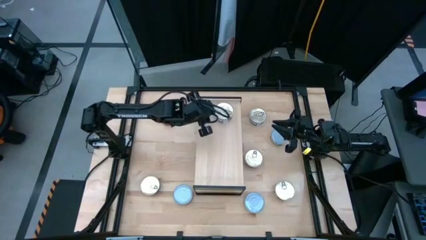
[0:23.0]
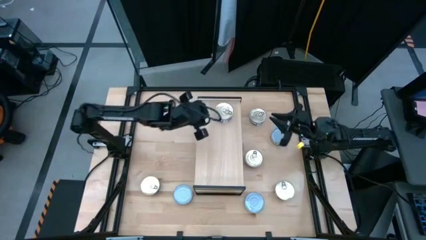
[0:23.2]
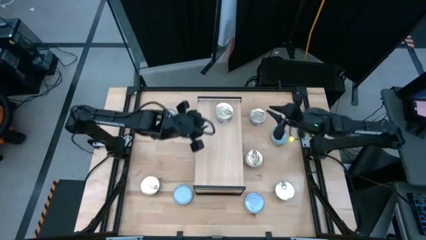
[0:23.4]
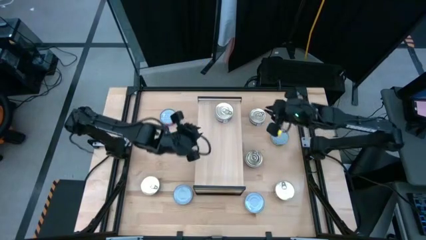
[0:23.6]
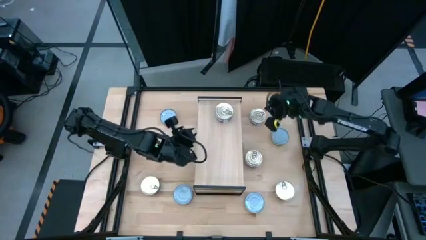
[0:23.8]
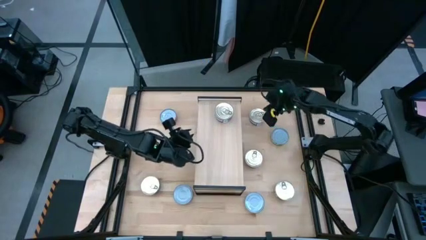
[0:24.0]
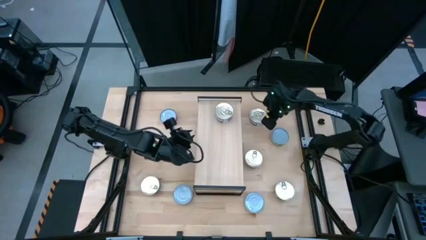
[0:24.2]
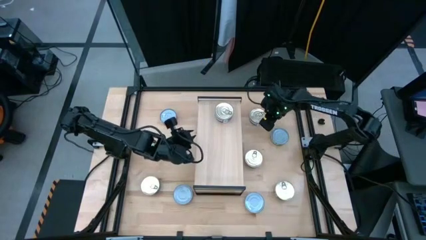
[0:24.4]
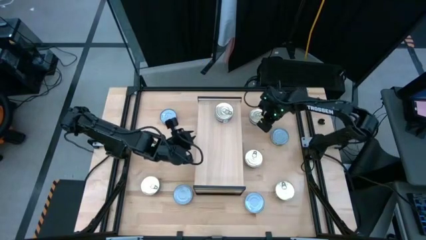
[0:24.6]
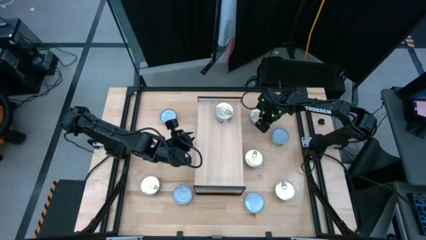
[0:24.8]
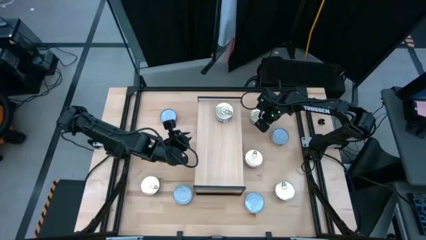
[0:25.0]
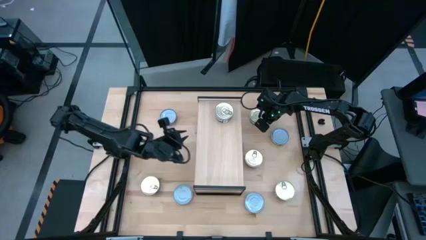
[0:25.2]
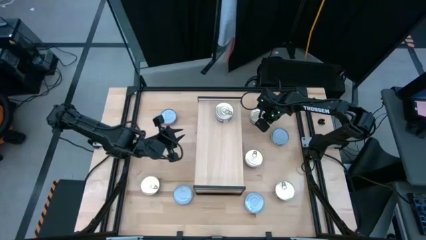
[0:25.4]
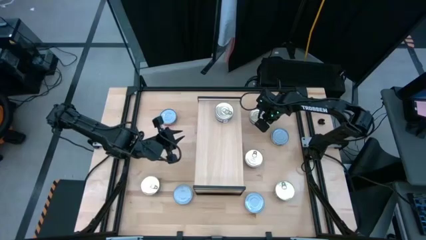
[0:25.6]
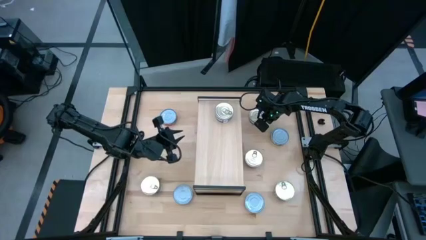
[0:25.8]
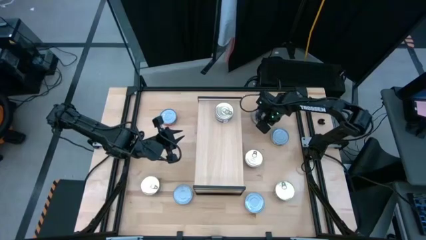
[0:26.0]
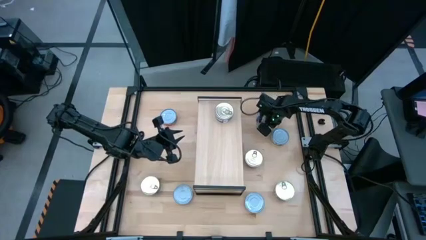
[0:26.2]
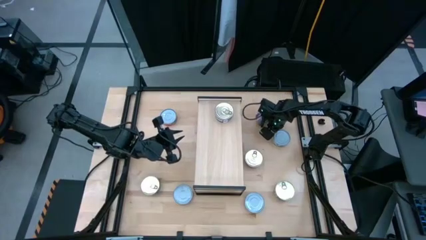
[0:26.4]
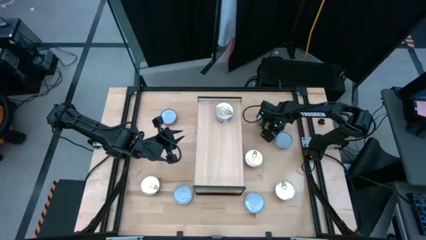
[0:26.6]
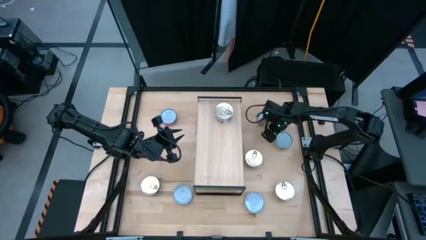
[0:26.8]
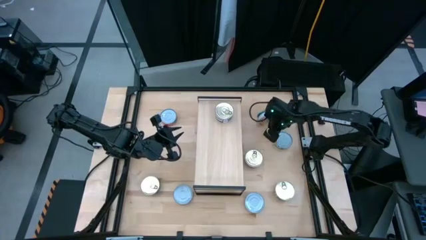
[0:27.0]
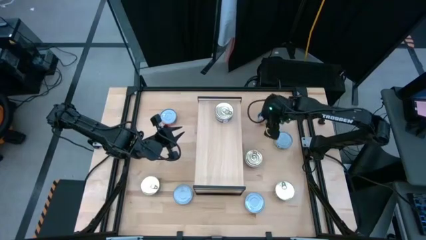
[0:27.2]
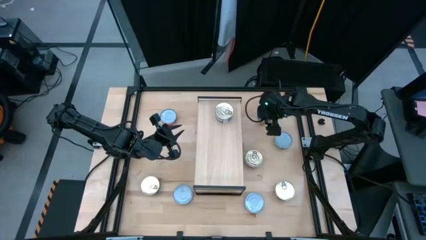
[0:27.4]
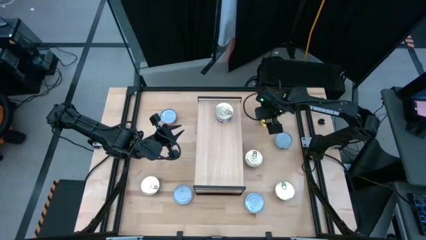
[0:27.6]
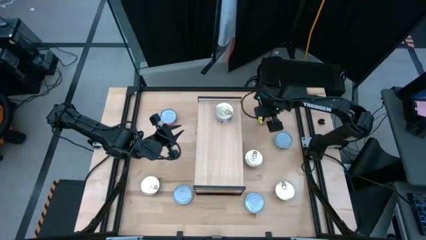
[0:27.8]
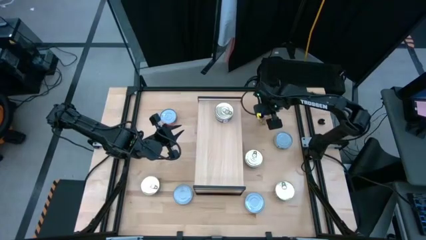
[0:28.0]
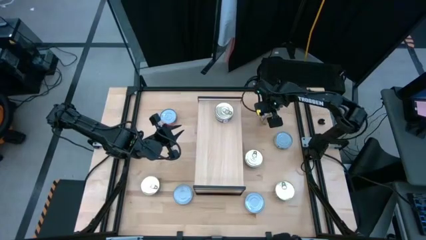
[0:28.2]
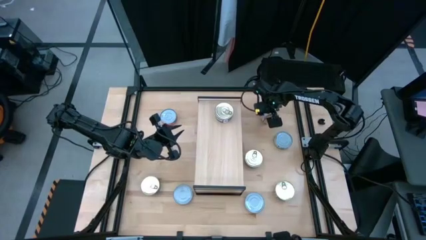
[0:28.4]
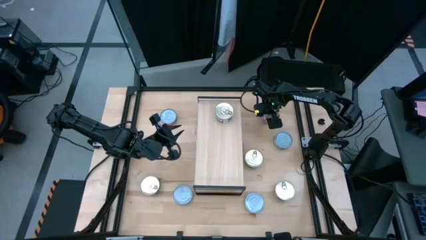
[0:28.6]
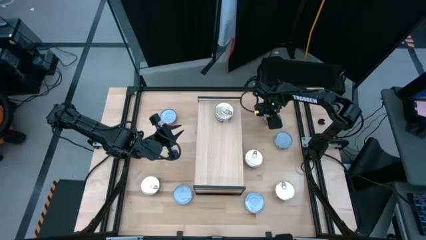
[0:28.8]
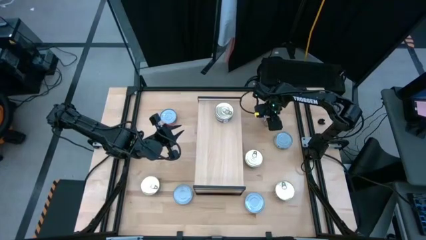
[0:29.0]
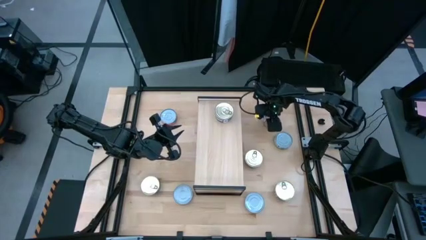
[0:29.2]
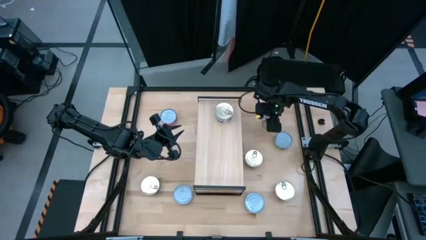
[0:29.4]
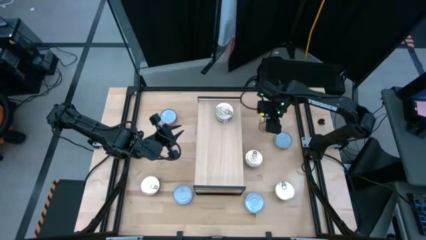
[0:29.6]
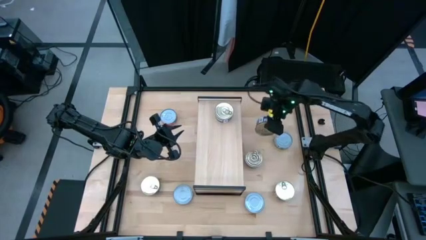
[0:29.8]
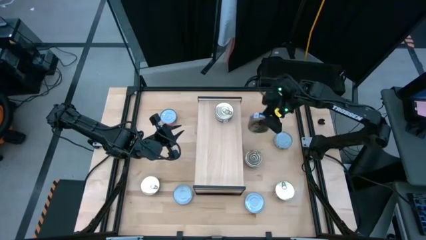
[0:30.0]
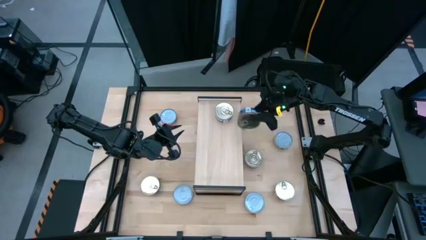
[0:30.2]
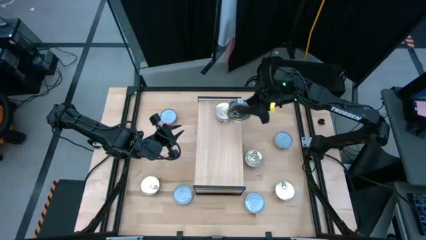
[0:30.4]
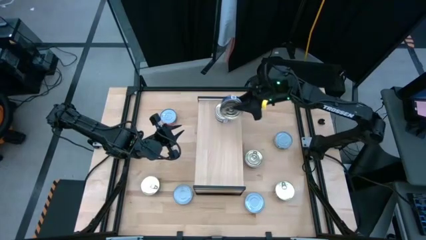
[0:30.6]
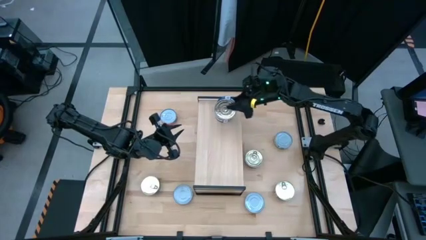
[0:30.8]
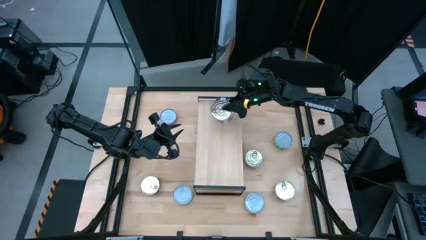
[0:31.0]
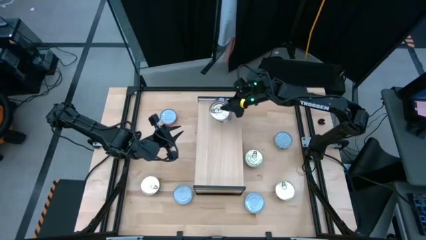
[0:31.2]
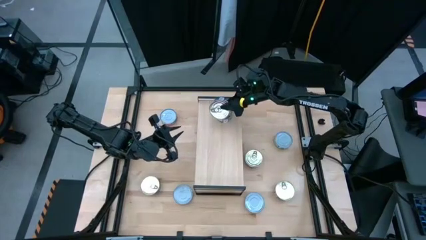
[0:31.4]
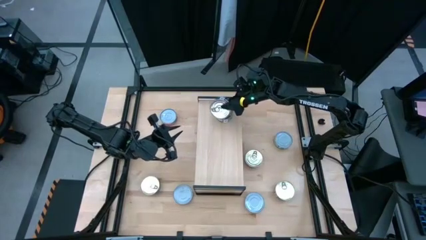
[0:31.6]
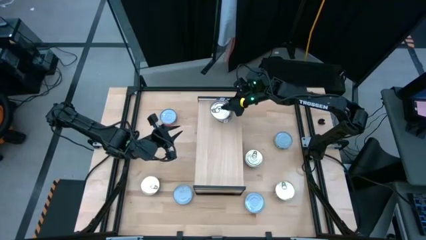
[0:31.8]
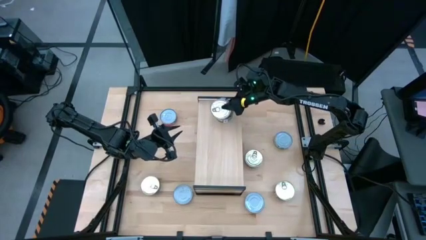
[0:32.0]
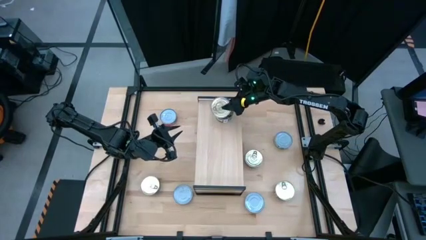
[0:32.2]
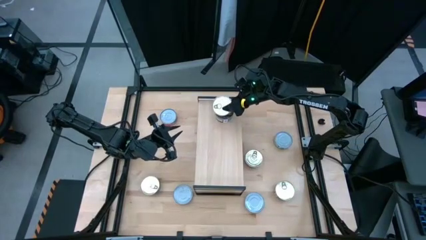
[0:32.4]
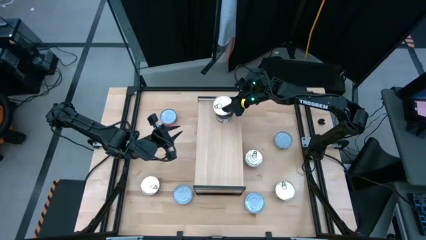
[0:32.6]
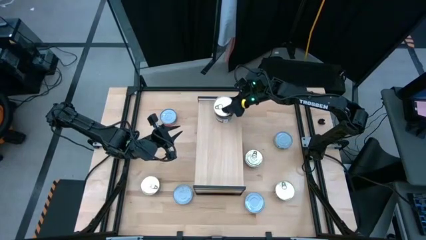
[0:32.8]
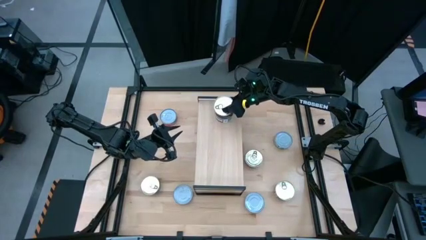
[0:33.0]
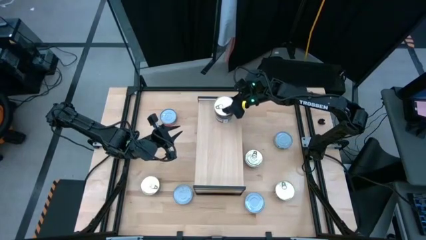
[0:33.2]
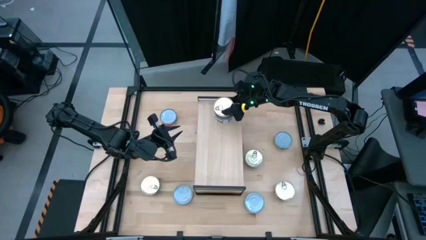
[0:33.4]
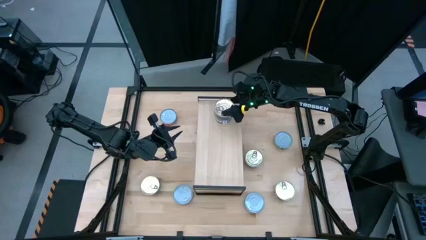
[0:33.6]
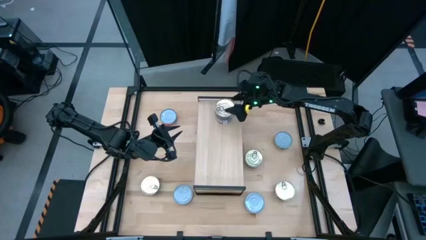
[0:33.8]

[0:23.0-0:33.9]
Task: Stack canned seafood by type on shelf
Stack the blue pink tuna can on top of the blue pink tuna can on the shelf

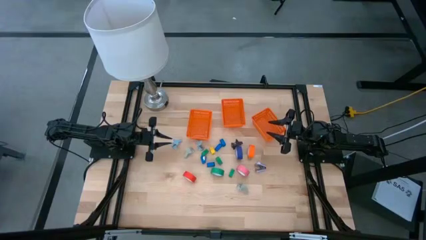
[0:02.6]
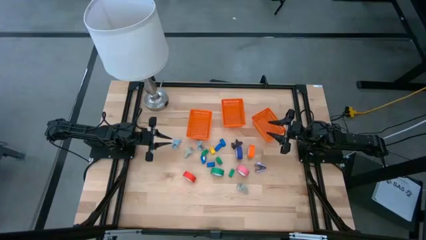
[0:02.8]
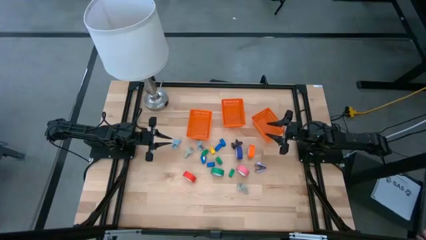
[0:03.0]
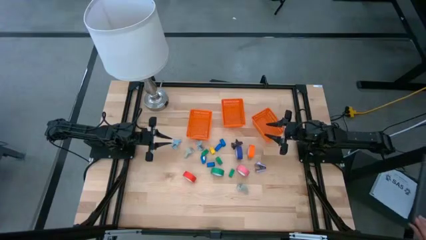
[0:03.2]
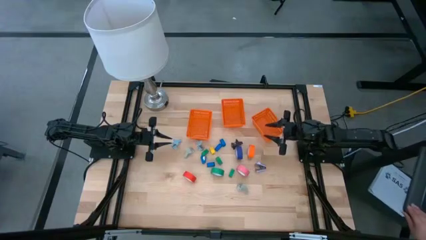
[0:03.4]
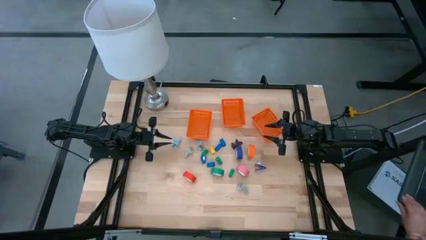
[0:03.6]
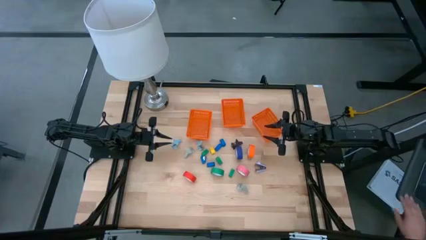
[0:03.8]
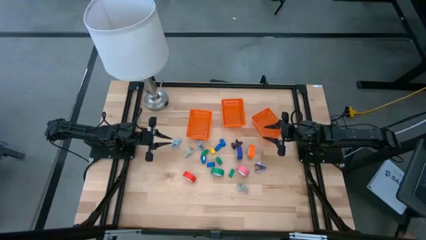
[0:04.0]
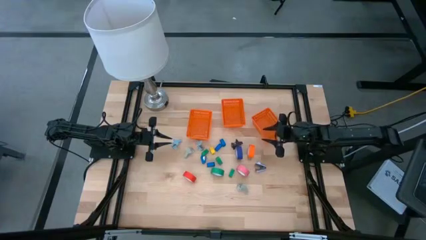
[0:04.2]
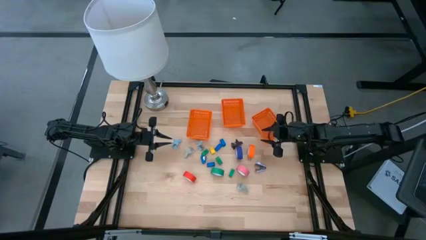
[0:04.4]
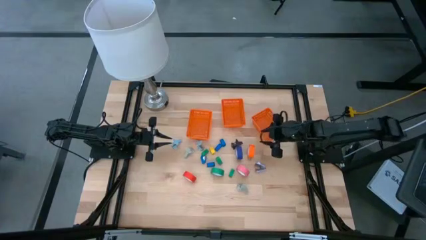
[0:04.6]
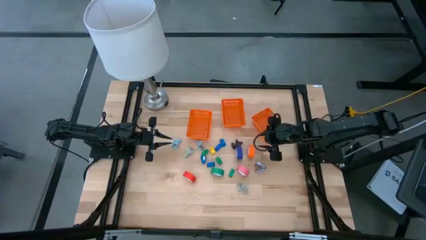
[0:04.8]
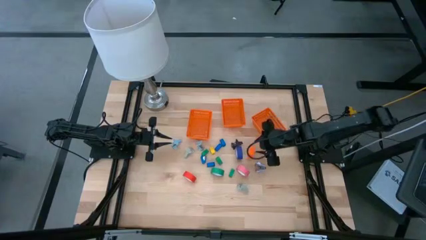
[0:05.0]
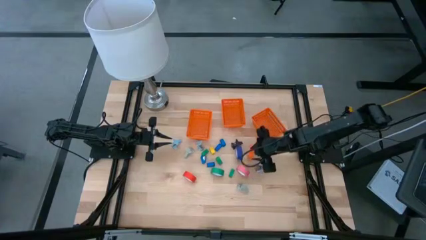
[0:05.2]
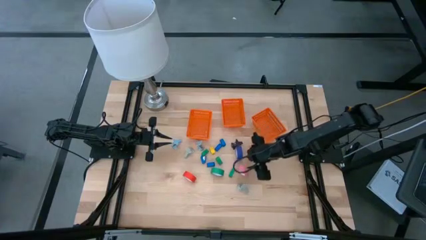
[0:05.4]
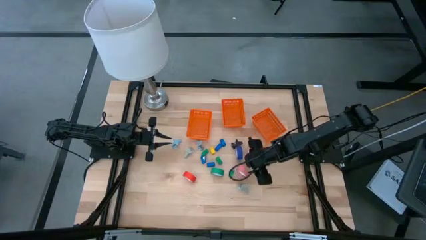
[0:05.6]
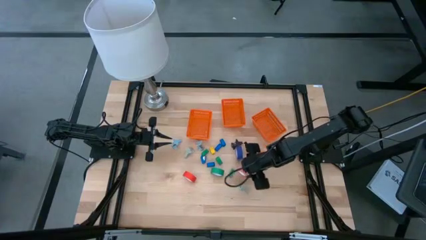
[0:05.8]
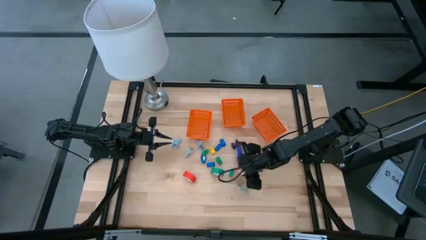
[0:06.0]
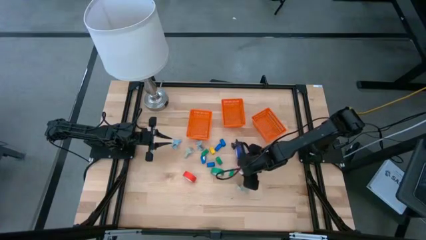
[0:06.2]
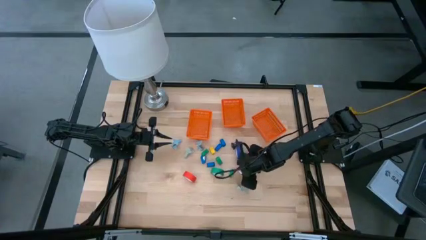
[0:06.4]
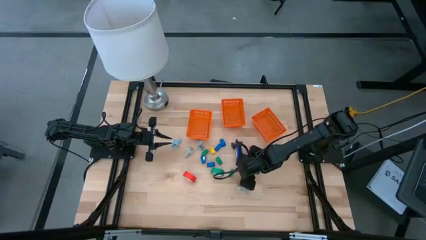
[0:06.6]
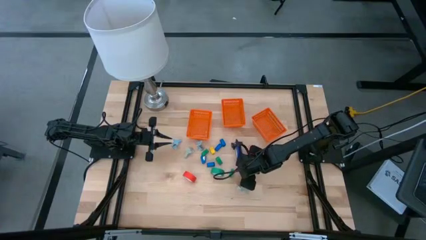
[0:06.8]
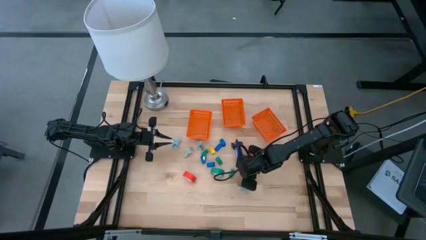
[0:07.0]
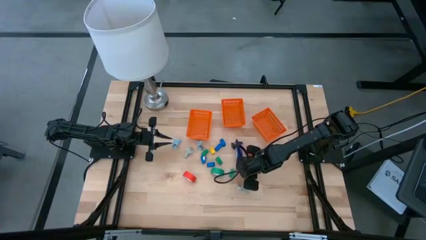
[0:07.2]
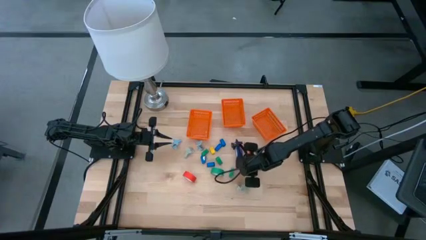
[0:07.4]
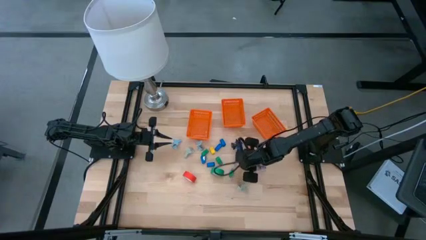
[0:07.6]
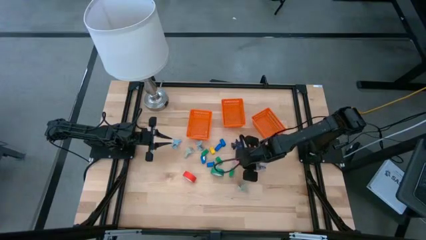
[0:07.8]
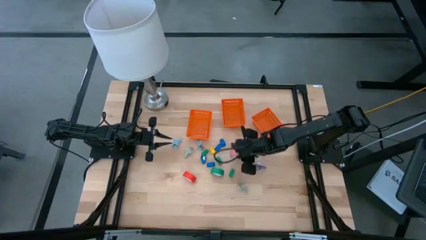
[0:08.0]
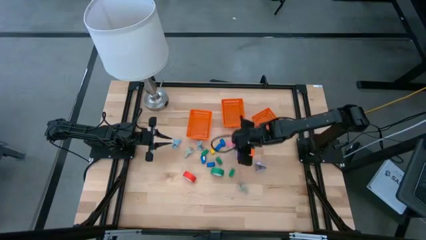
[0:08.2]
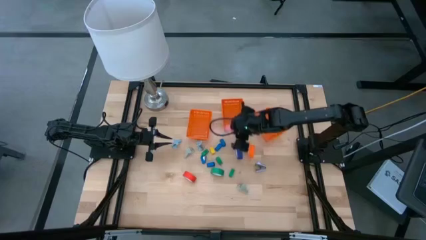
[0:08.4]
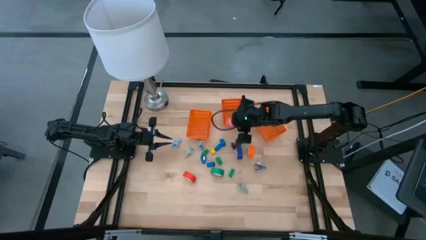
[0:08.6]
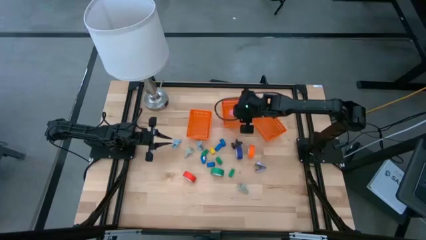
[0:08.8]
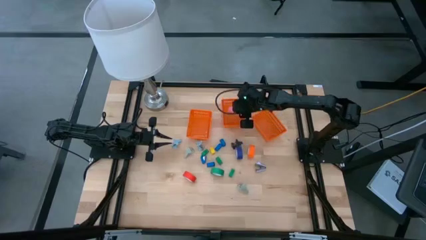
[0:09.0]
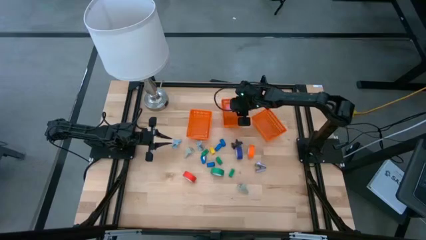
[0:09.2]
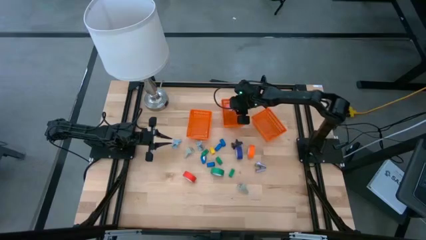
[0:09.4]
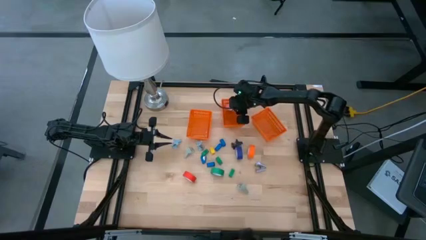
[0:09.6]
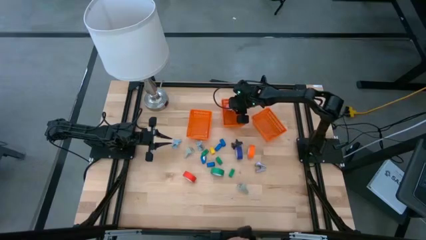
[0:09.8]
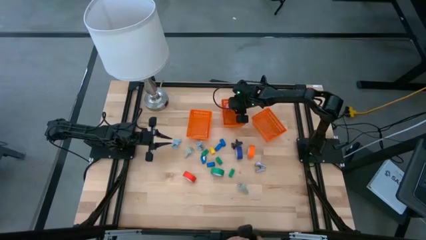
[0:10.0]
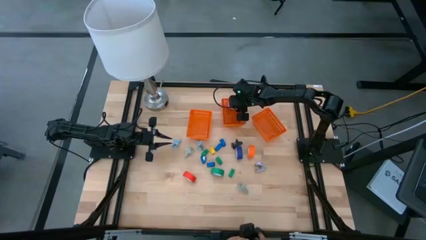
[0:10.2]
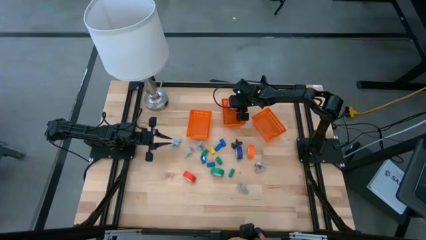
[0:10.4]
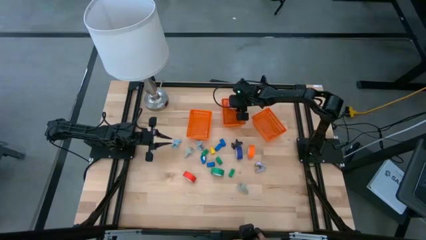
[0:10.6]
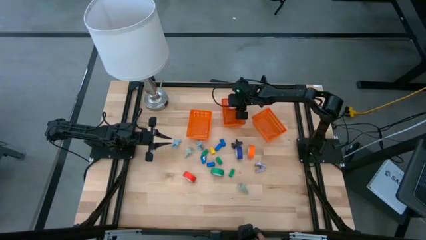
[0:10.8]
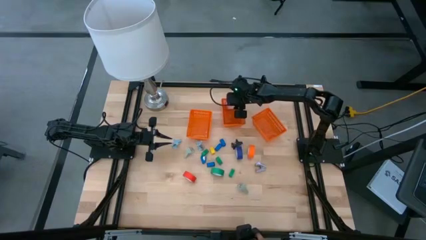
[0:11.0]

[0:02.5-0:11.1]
Task: Pick and place Stapler, Stapler remover, tape
Put the pink adhesive tape into the middle orange bin
